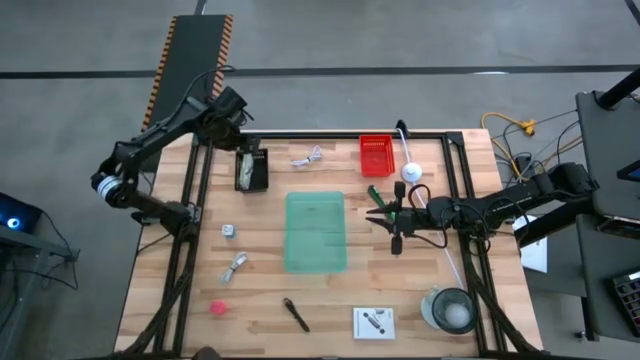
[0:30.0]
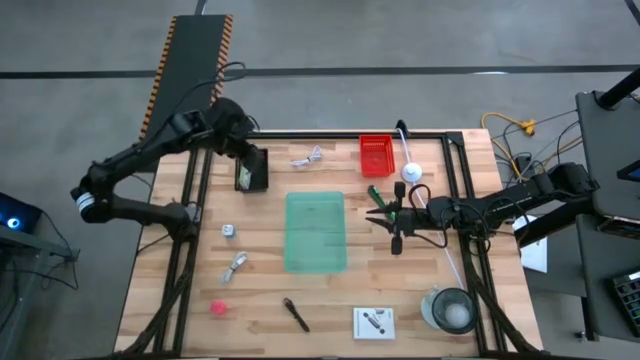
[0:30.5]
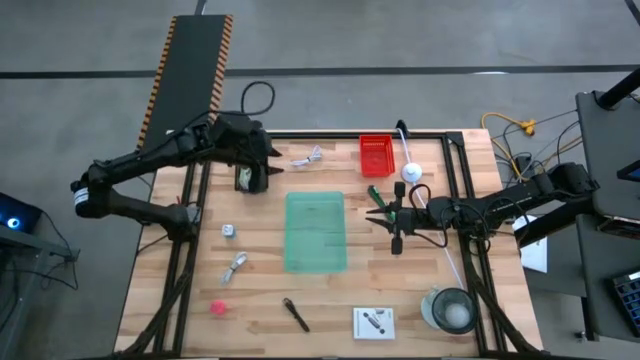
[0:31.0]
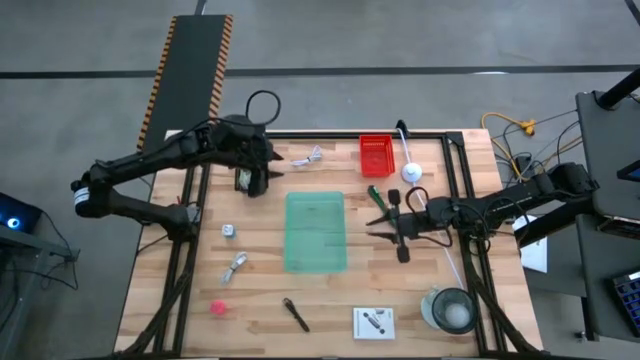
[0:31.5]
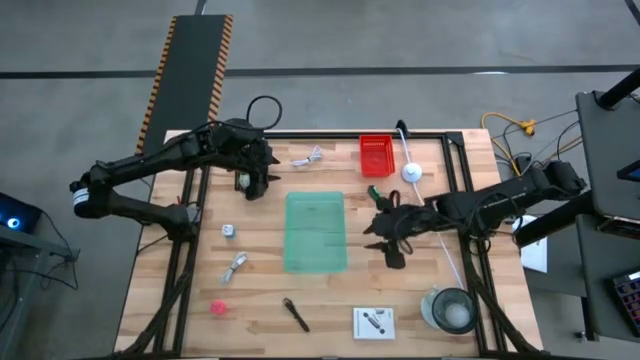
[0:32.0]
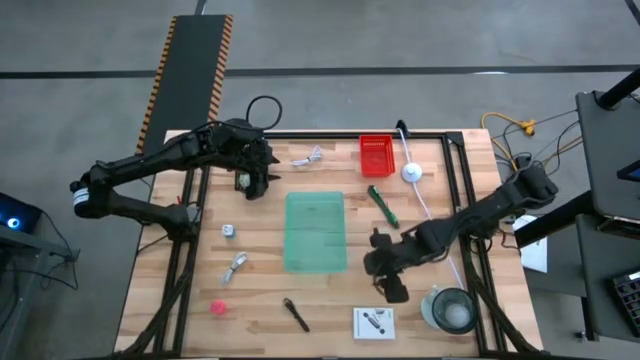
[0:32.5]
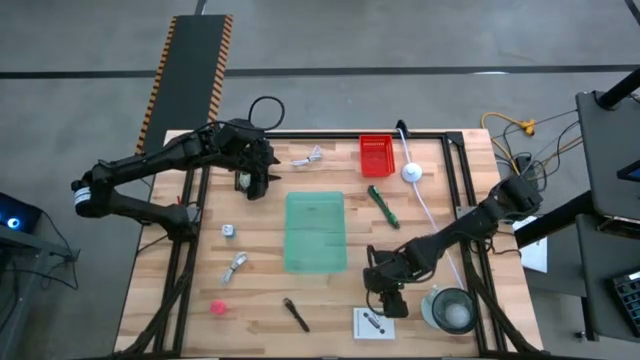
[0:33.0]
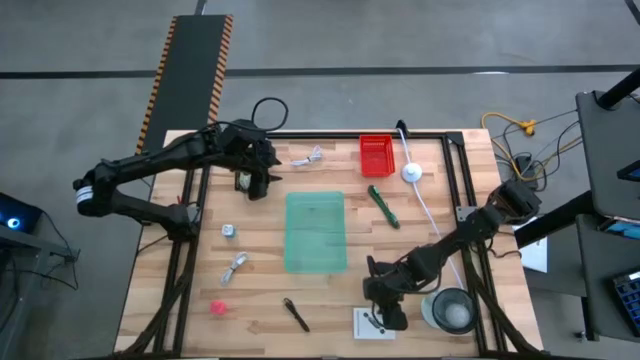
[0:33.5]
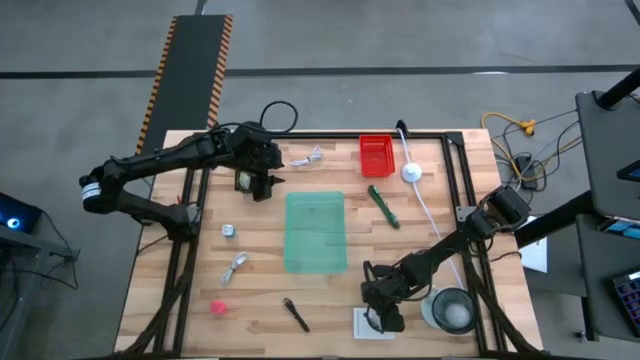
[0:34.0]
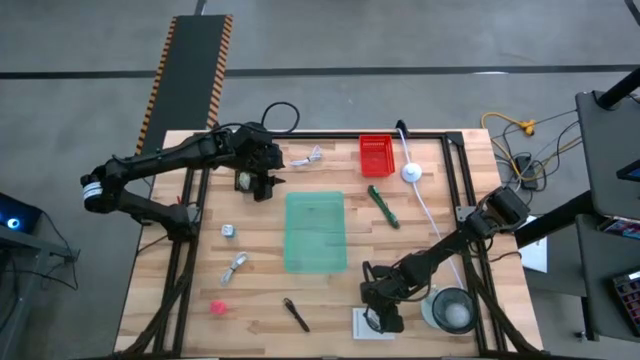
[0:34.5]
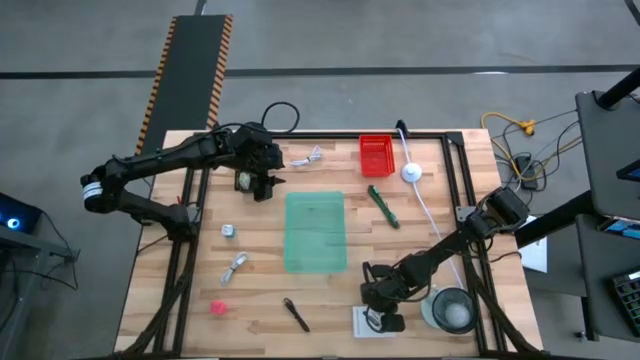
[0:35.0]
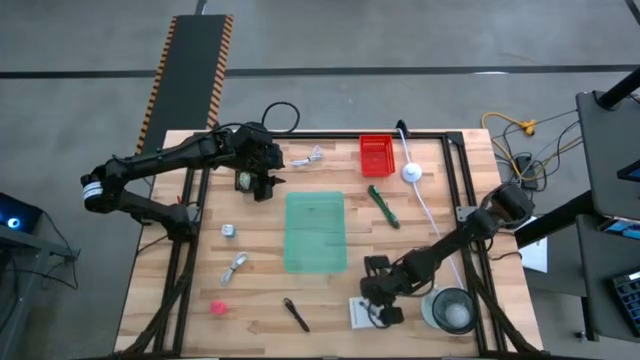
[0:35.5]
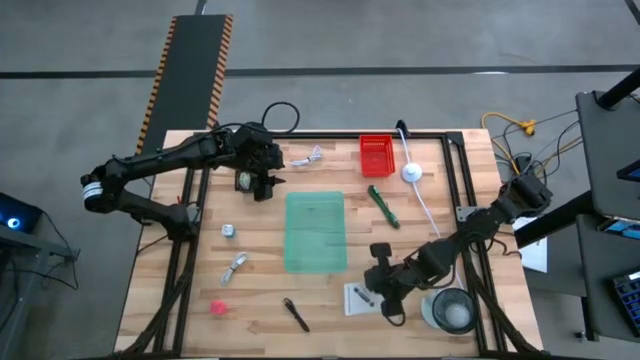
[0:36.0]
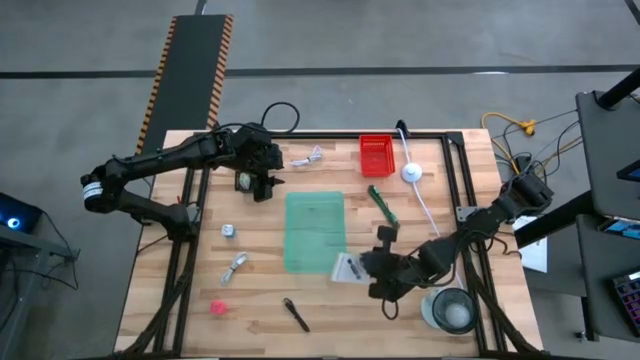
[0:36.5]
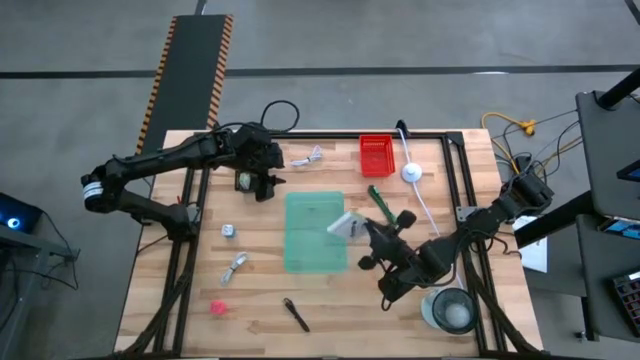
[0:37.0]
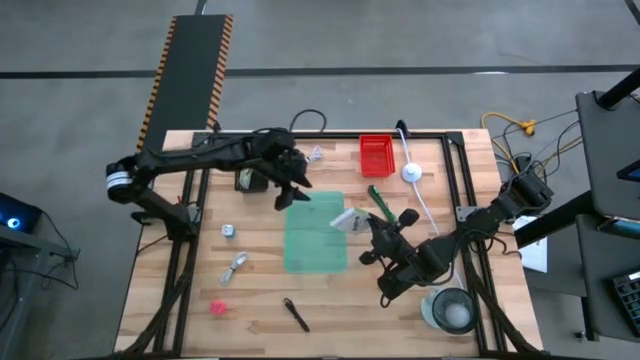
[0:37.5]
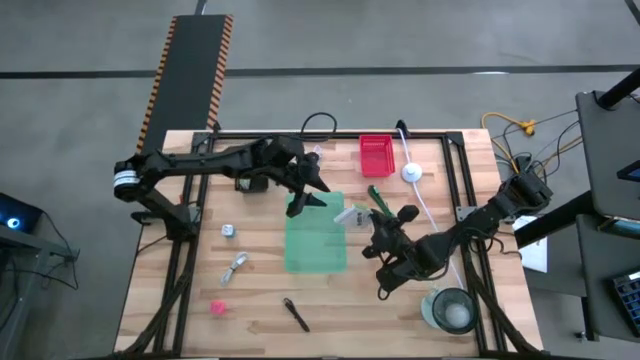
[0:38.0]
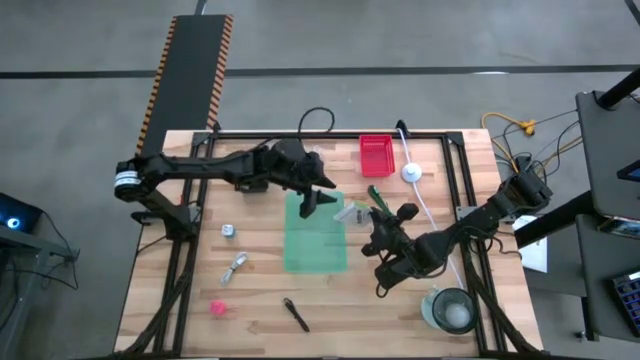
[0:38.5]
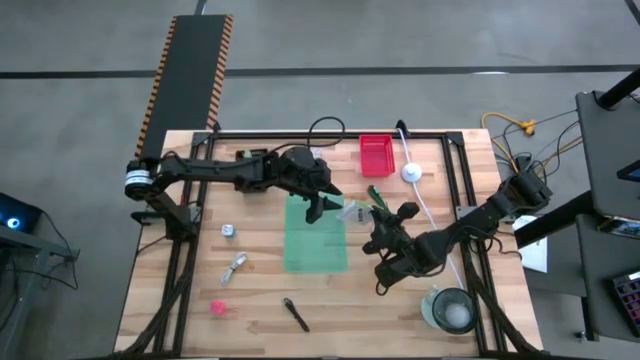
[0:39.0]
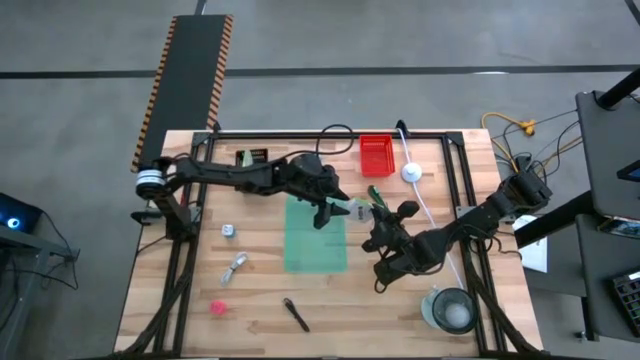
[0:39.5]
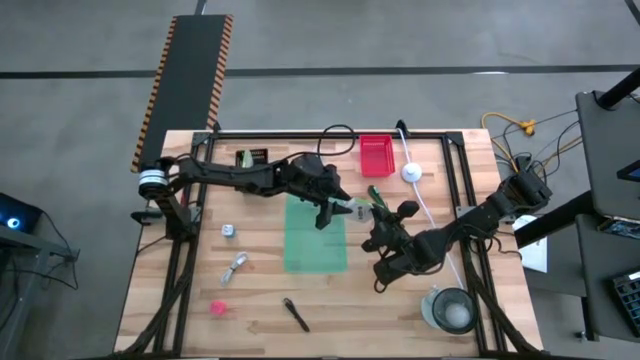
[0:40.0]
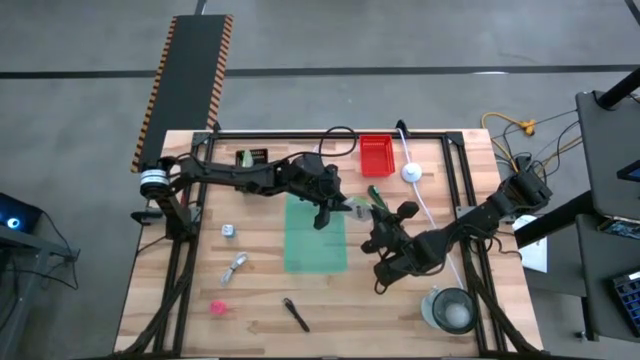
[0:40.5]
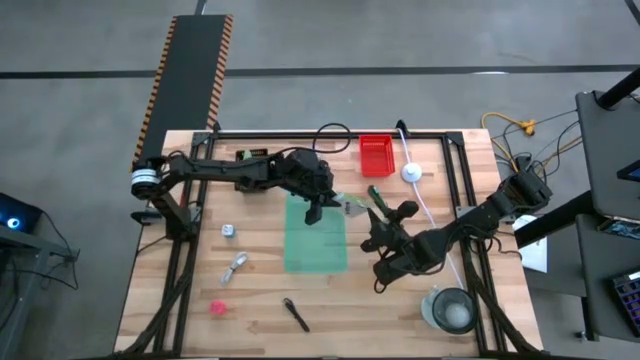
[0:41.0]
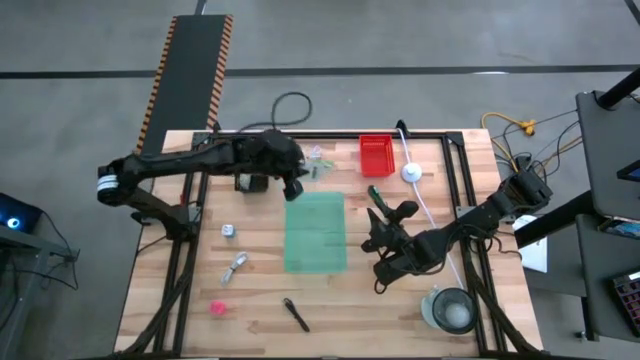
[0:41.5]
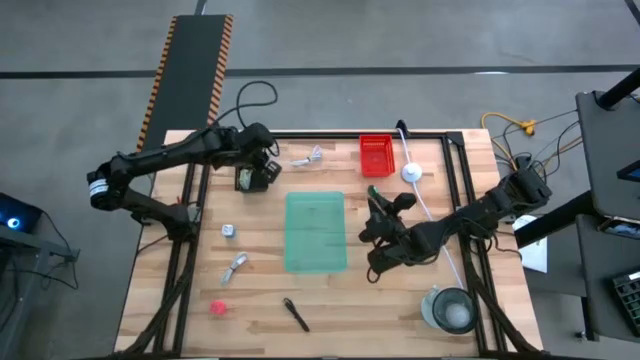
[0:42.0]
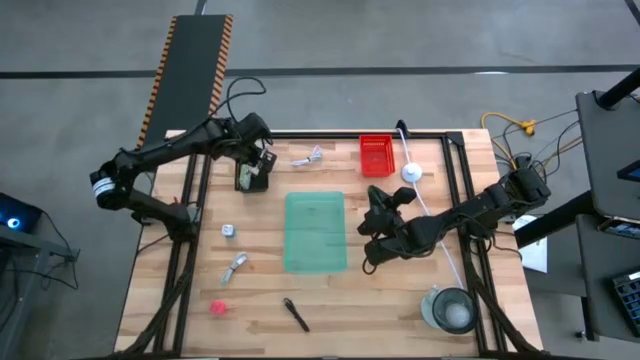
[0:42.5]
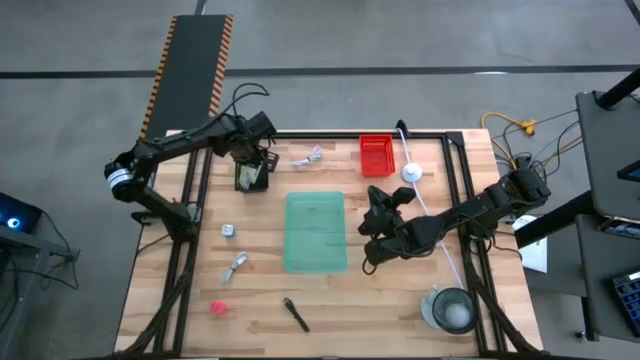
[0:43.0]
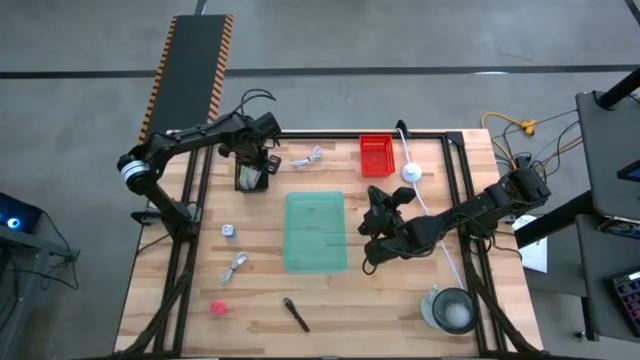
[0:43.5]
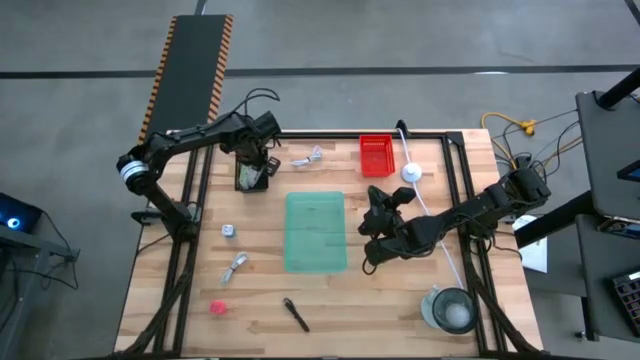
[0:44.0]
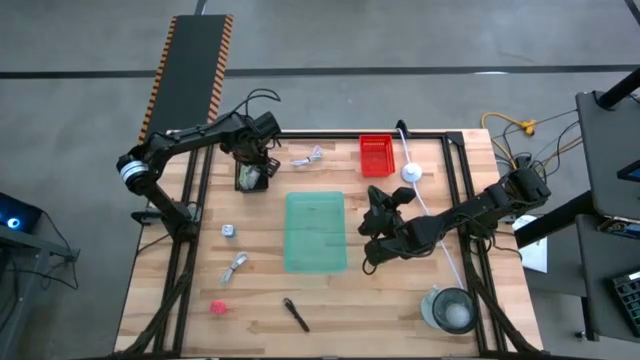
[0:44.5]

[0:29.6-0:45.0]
Task: Pick and place items into bin
Put the white card reader box into the black bin

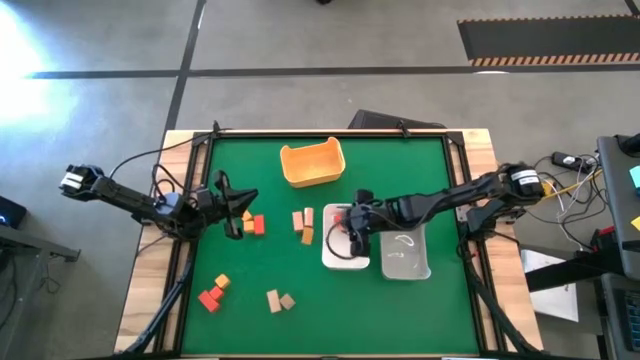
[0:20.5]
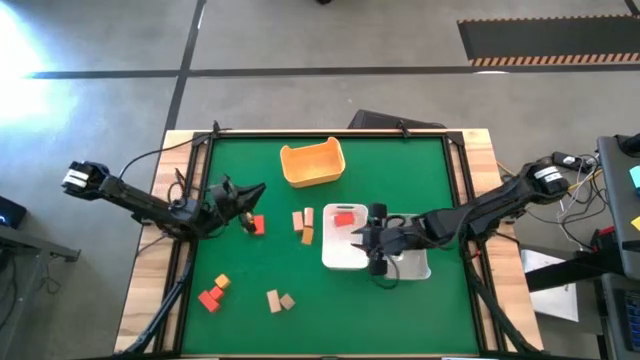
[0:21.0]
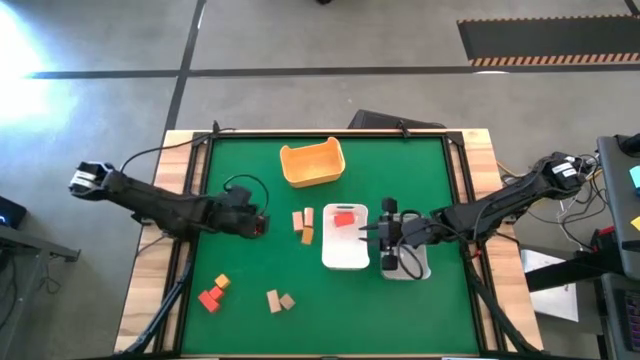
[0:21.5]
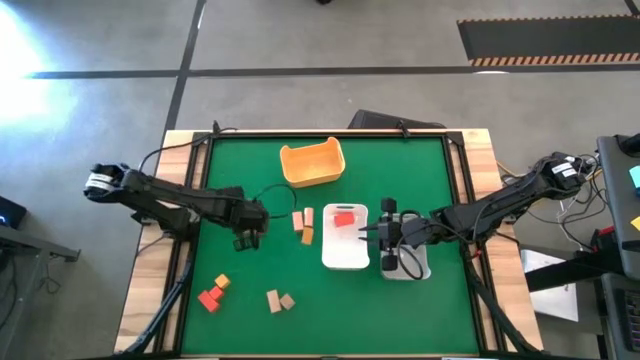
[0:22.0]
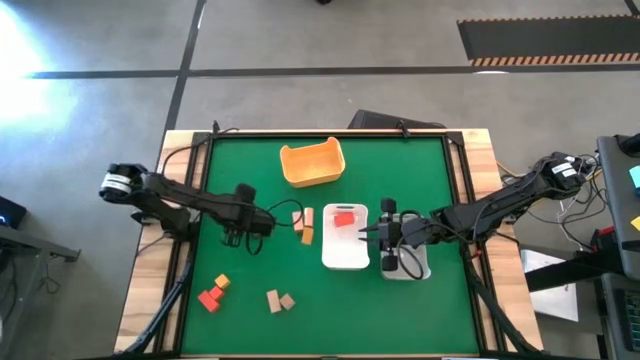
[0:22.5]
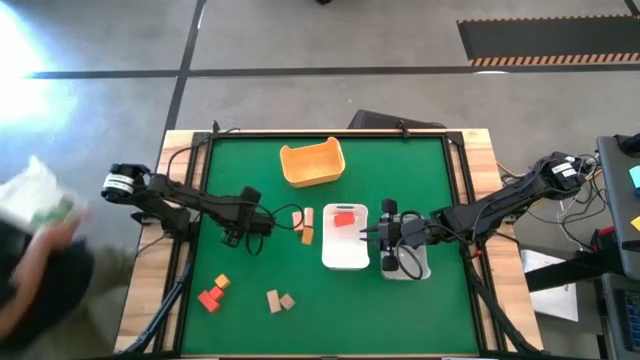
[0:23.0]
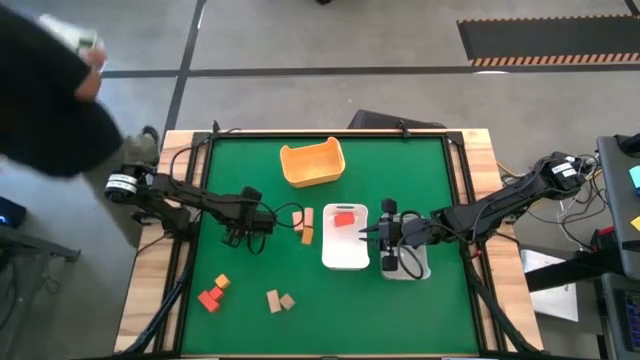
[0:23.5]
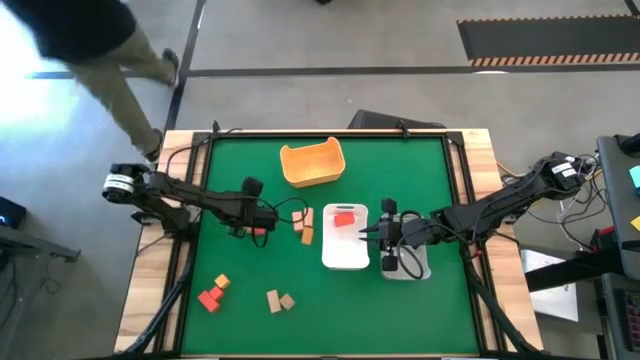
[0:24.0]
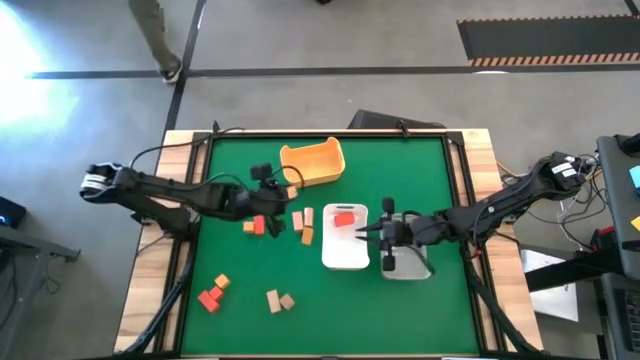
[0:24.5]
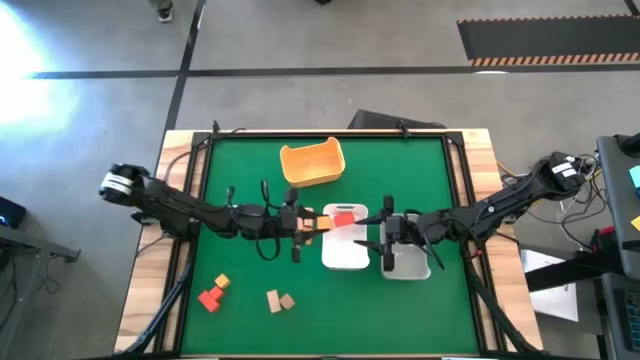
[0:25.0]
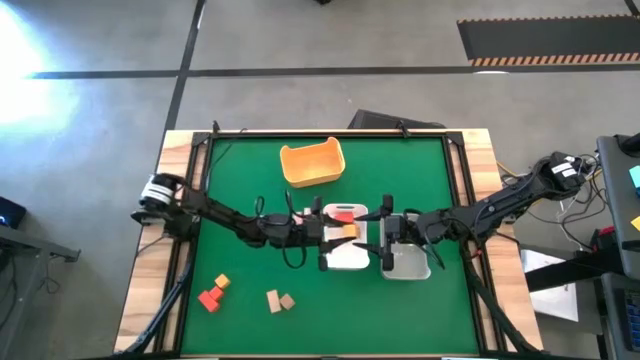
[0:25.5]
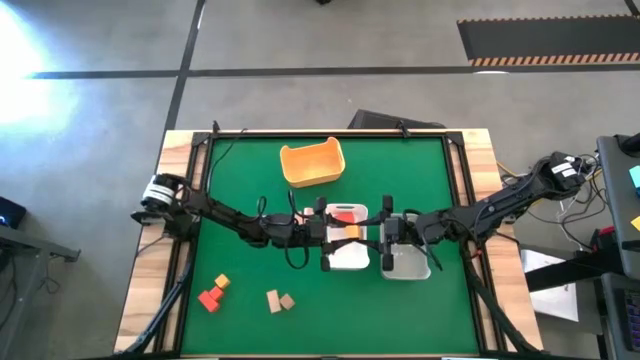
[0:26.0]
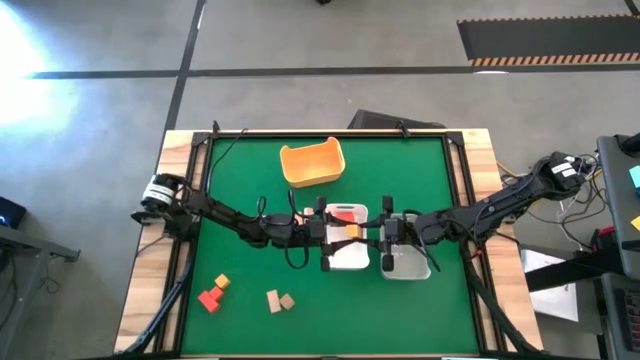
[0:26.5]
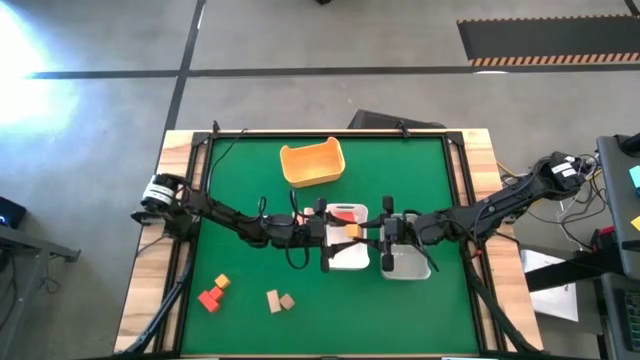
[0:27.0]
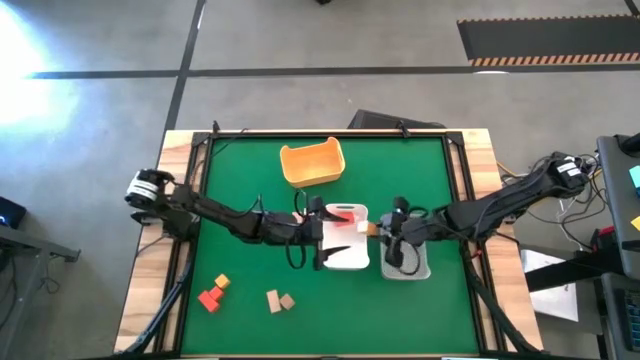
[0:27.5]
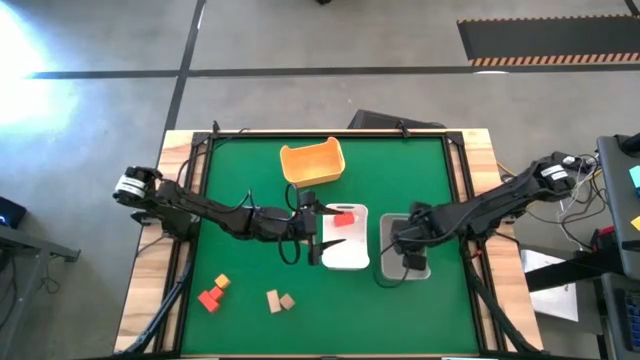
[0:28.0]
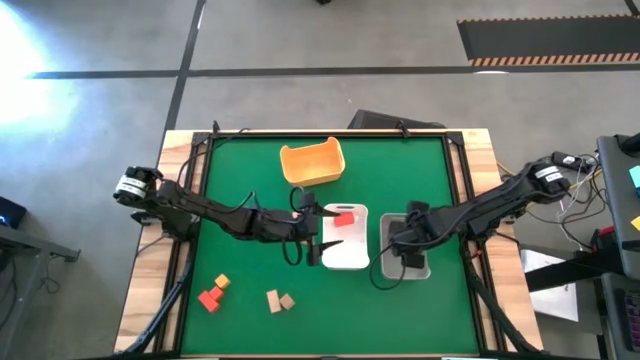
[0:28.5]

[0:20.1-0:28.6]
Task: Sort & place blocks by color
Put the yellow block into the gray bin
